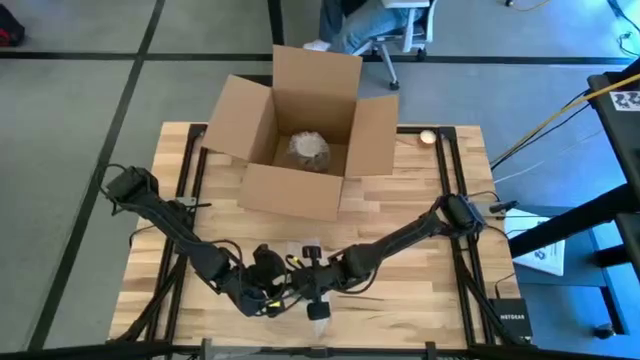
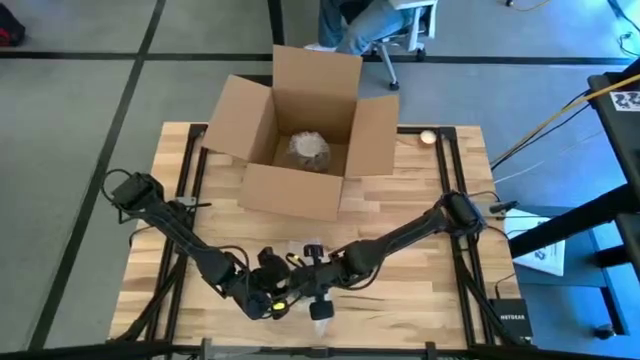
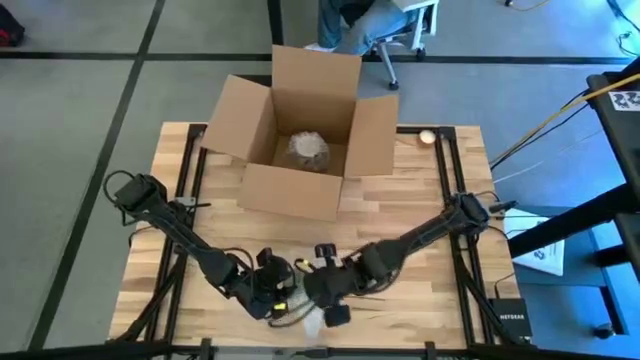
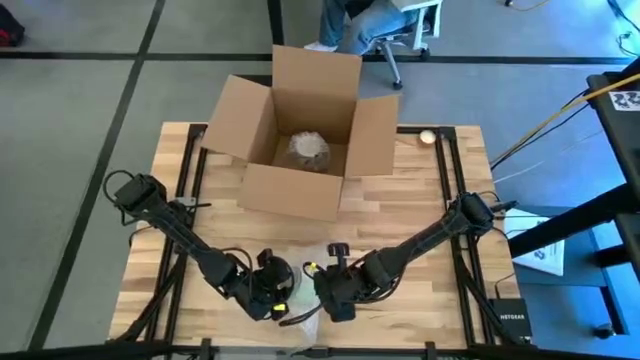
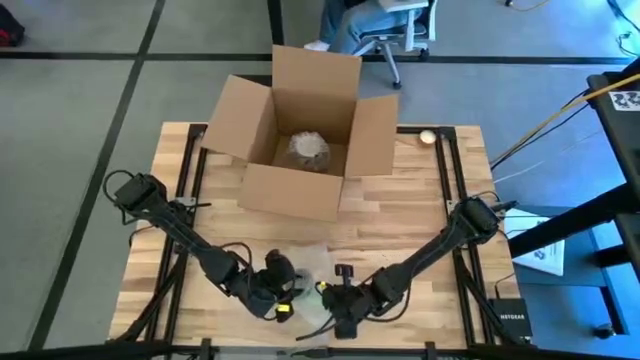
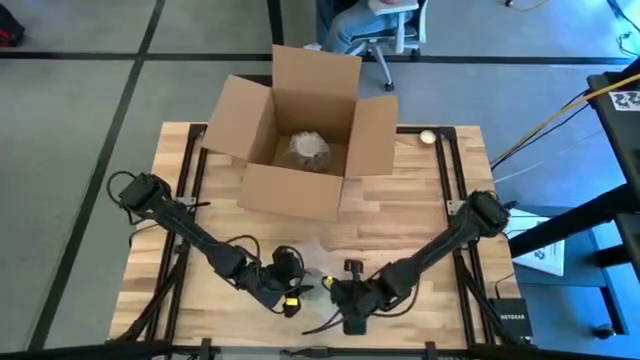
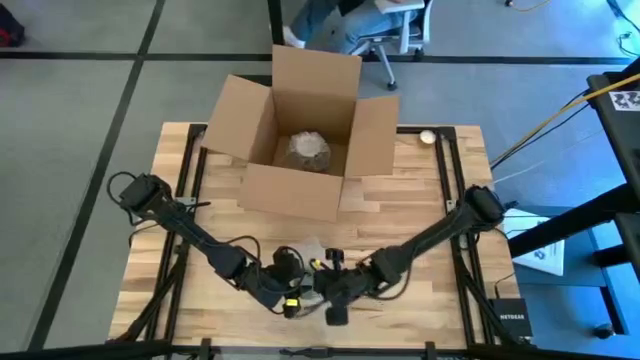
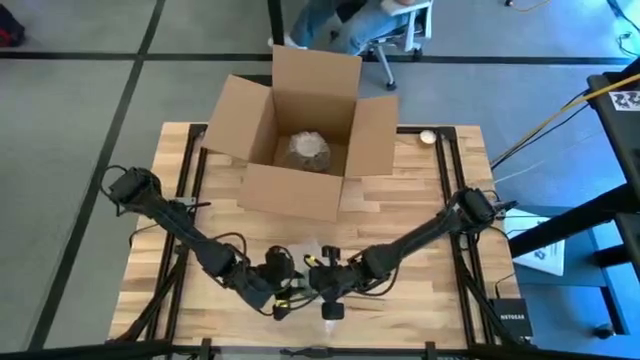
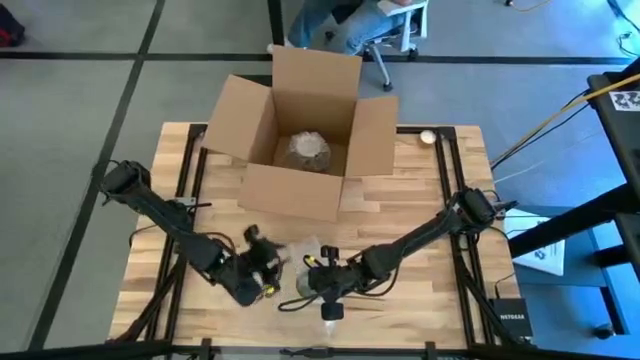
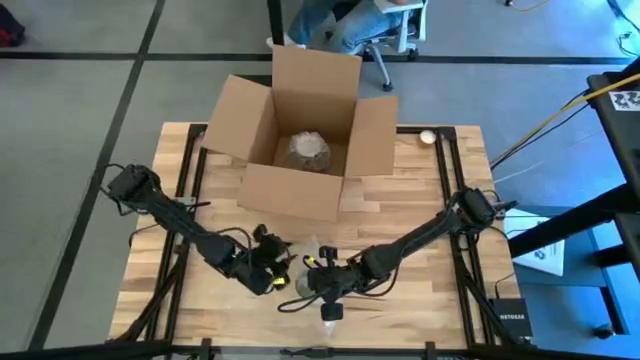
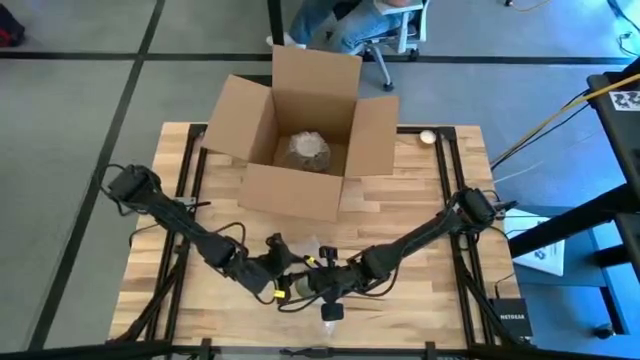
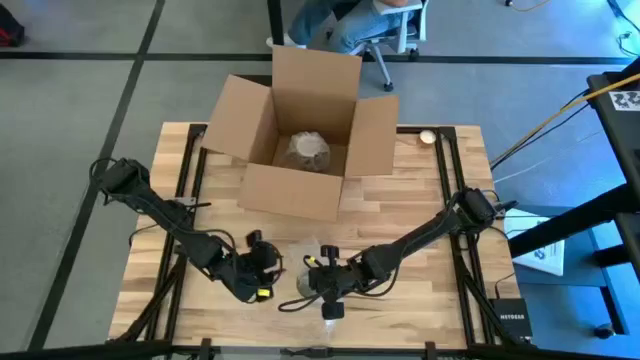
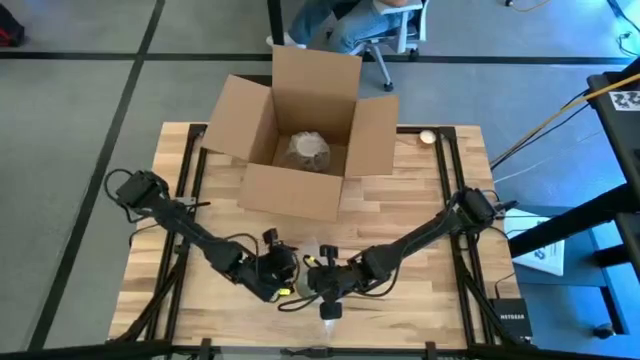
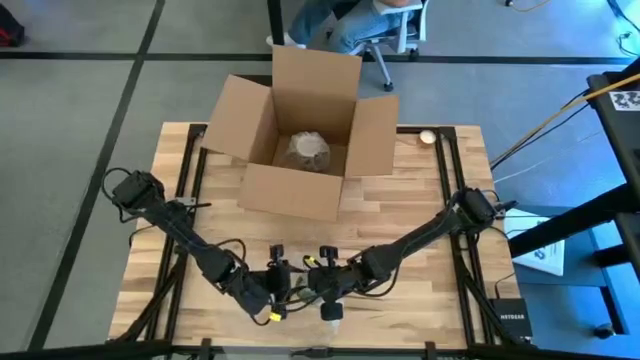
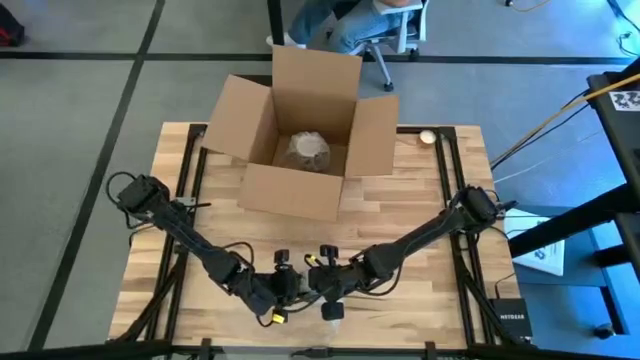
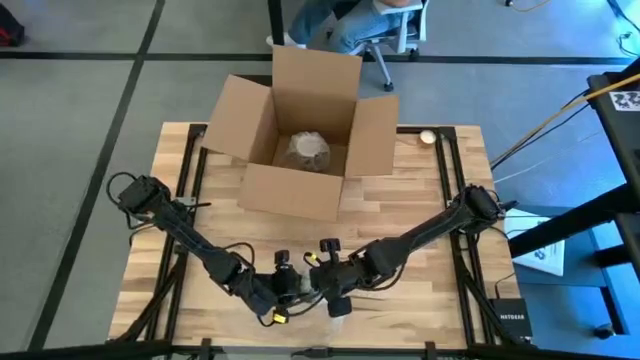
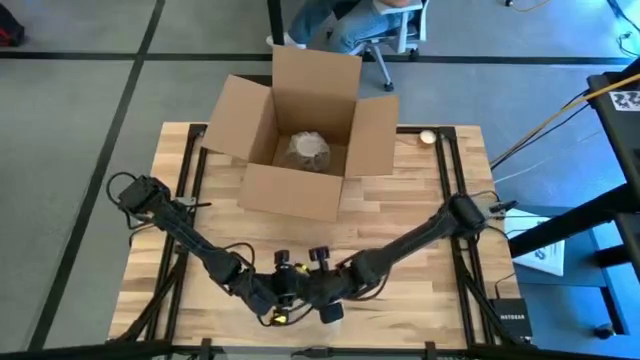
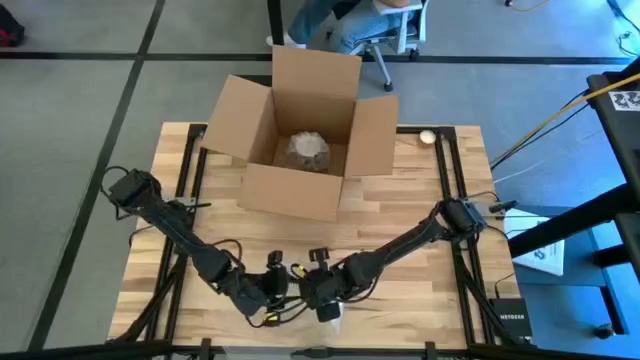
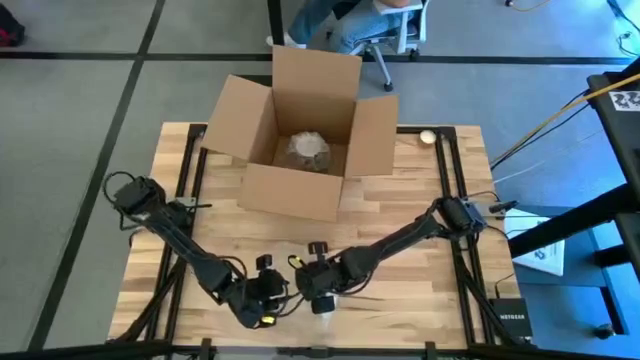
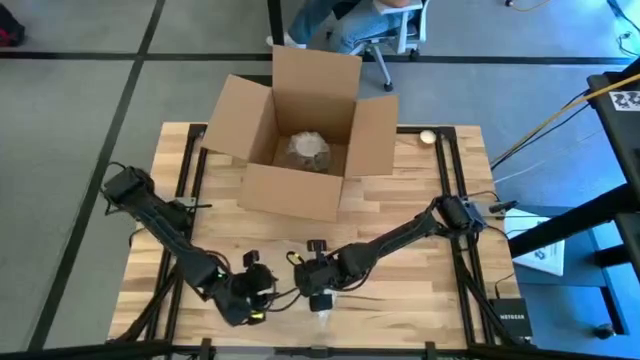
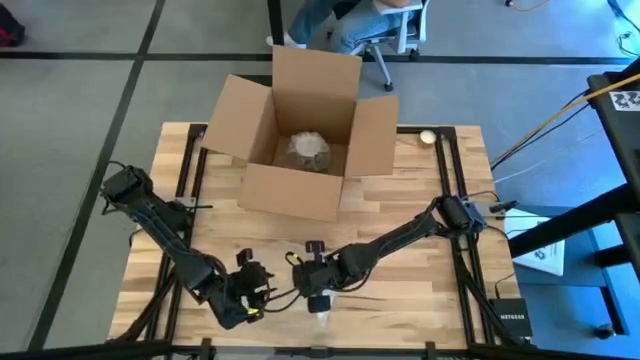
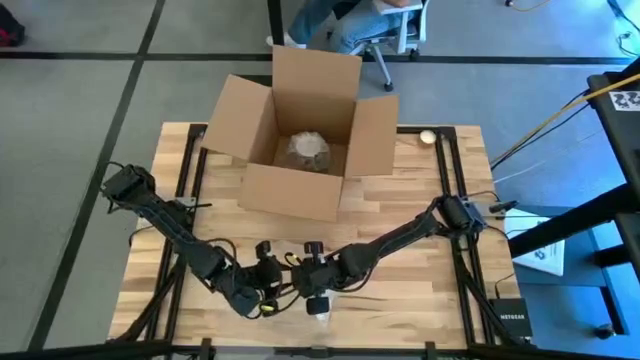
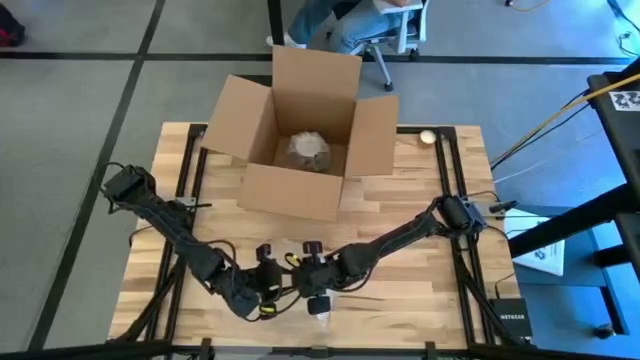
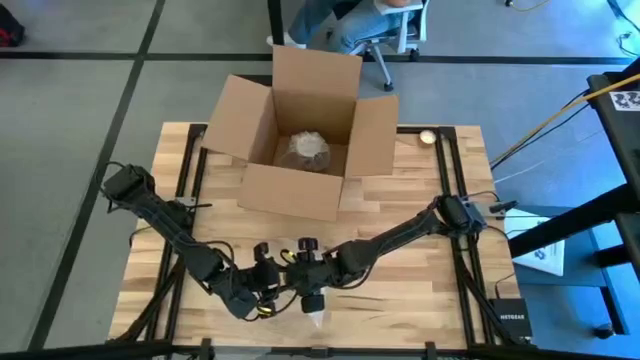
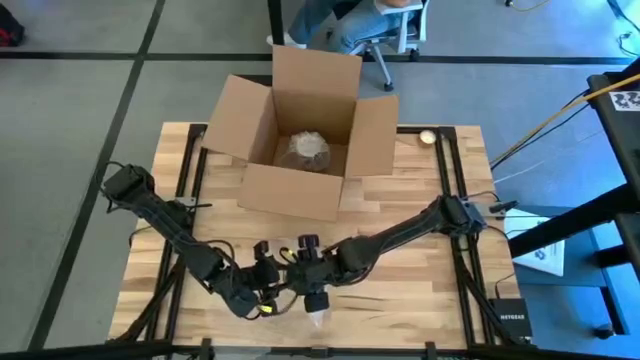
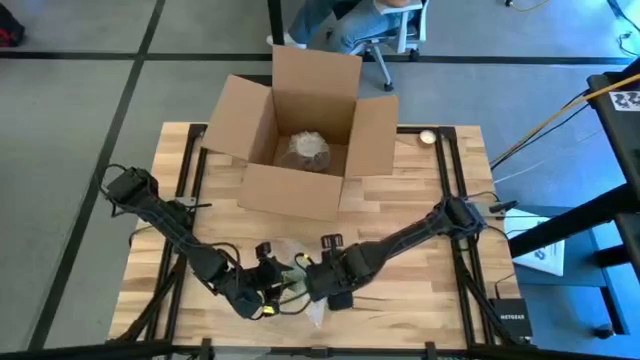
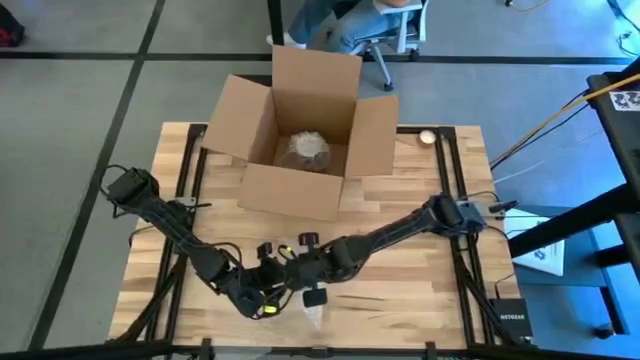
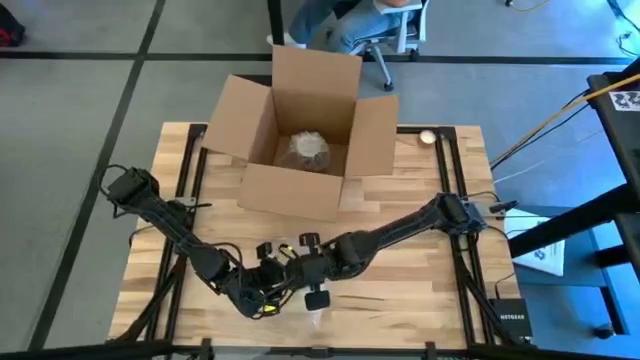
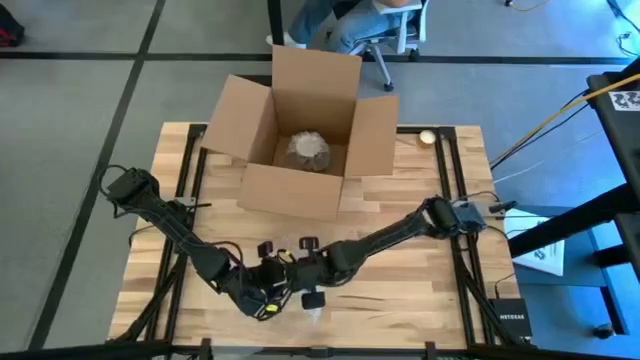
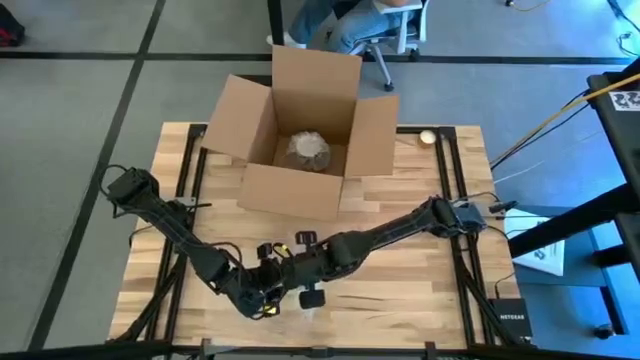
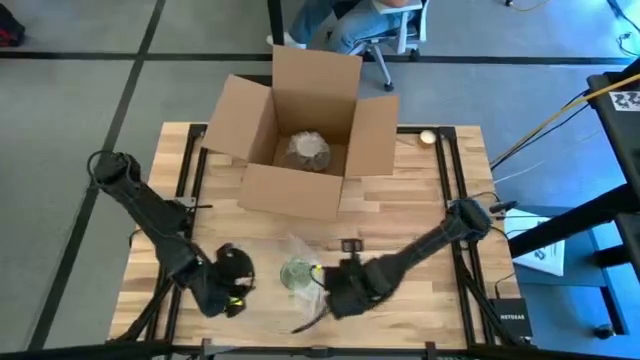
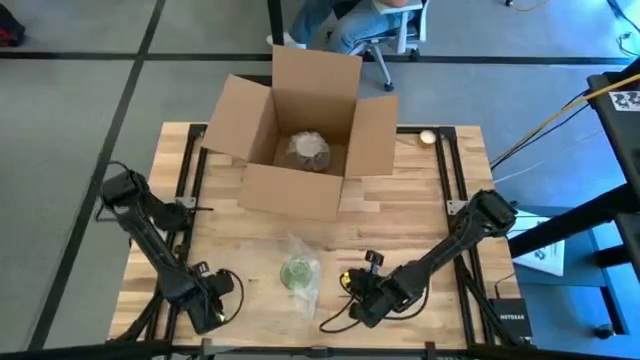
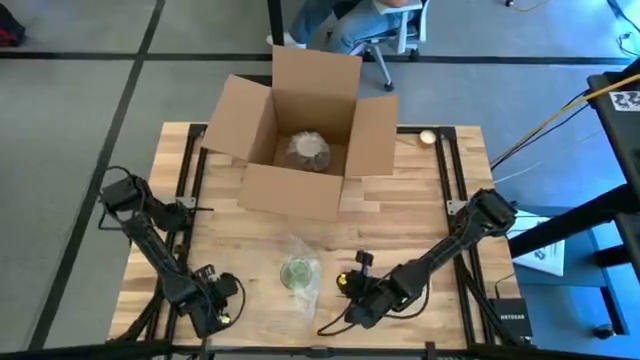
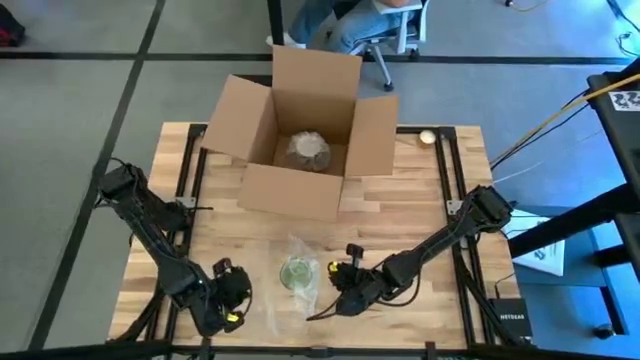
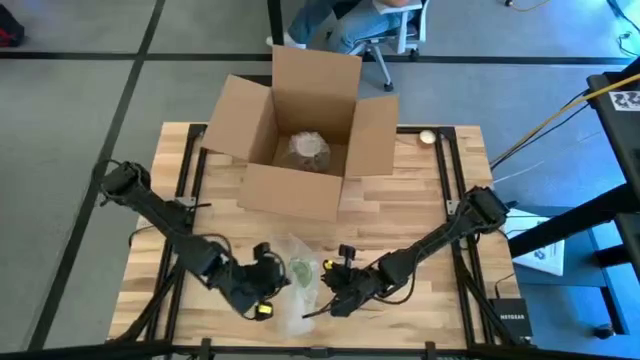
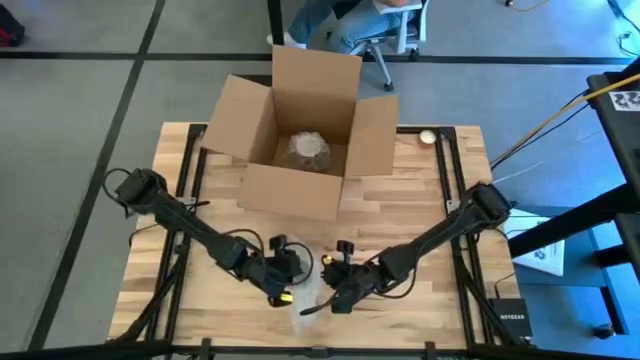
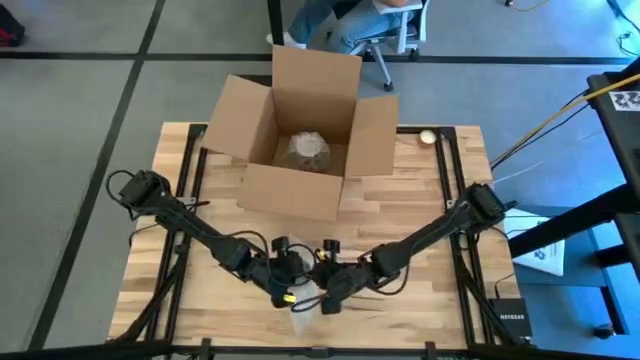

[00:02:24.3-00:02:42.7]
Task: wrap mug
Wrap the green mug with the transparent bubble wrap

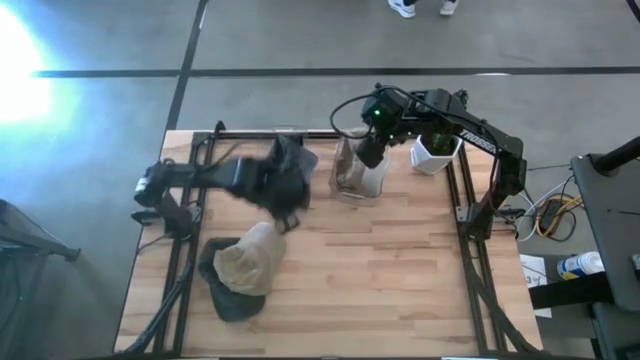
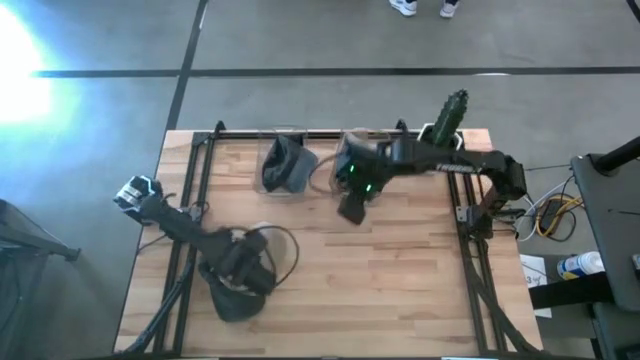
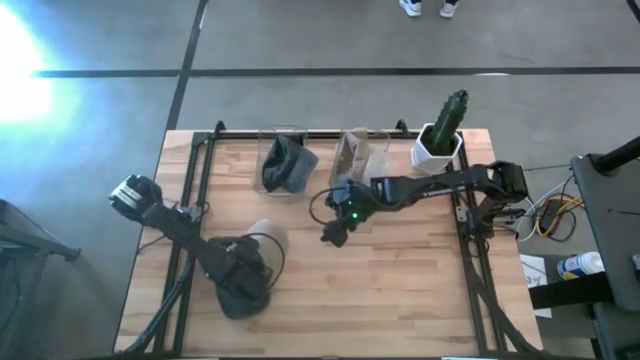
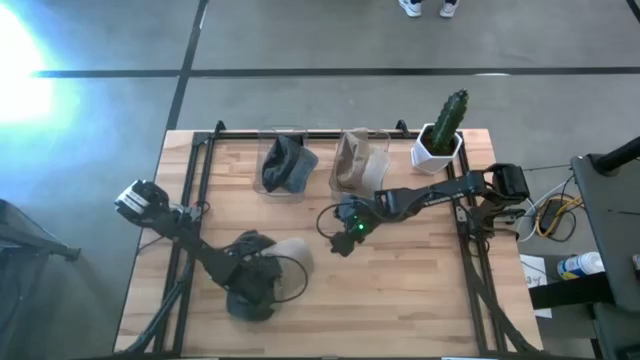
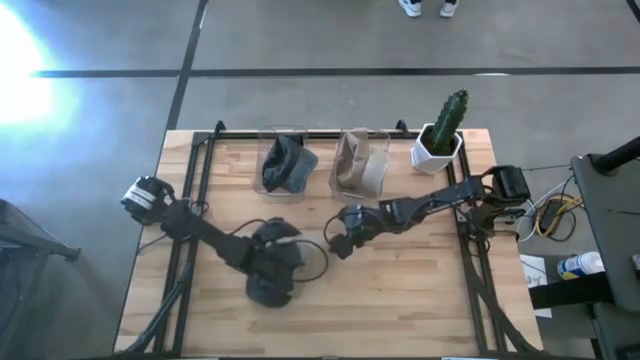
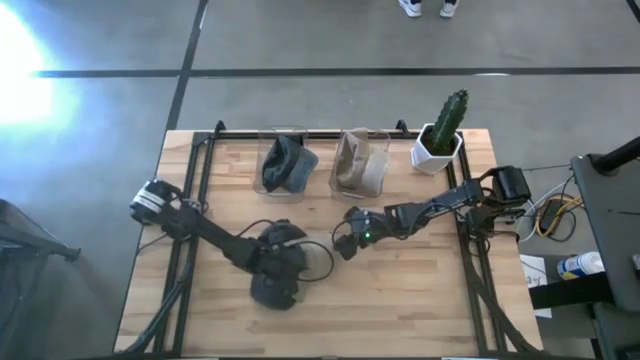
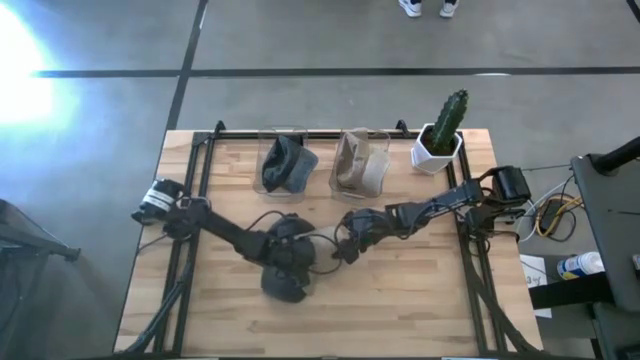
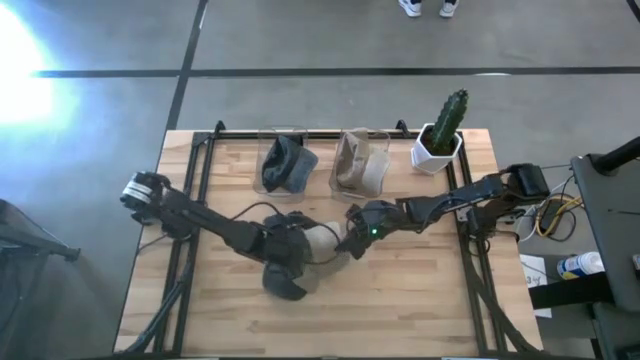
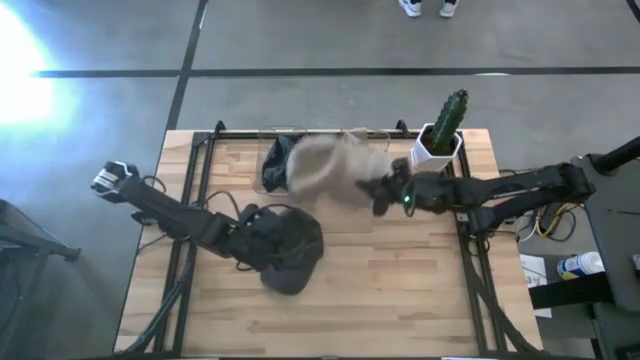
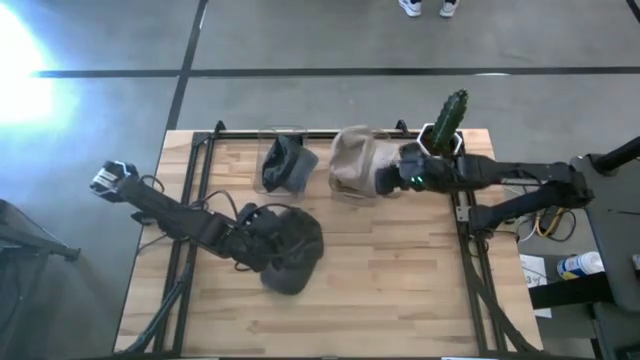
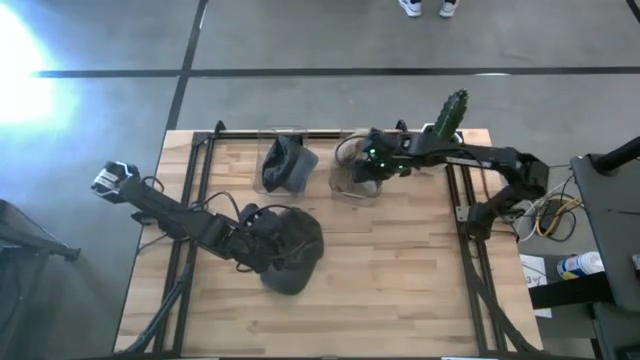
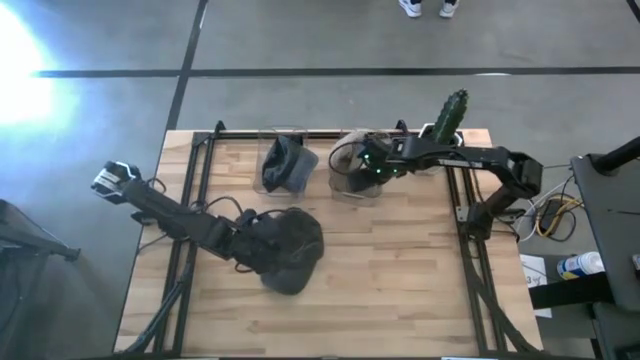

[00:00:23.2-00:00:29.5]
Task: Pick & Place hat
Put the brown cap into the right transparent bin
